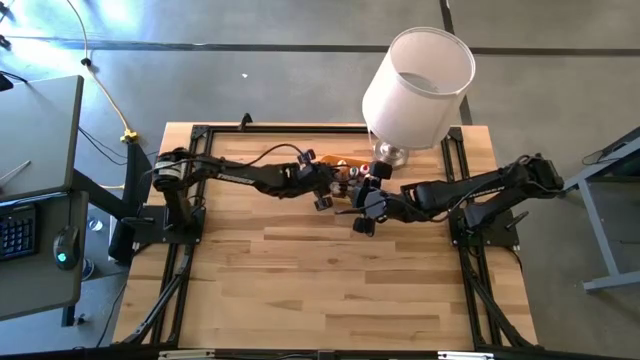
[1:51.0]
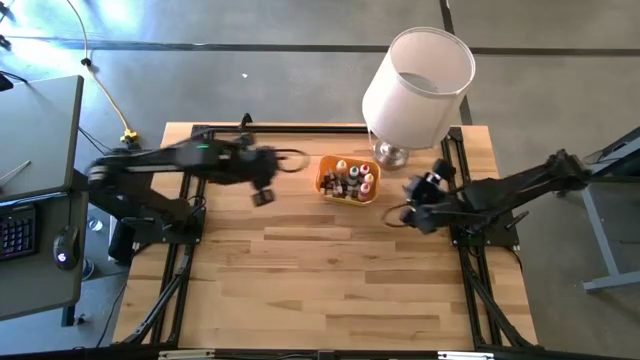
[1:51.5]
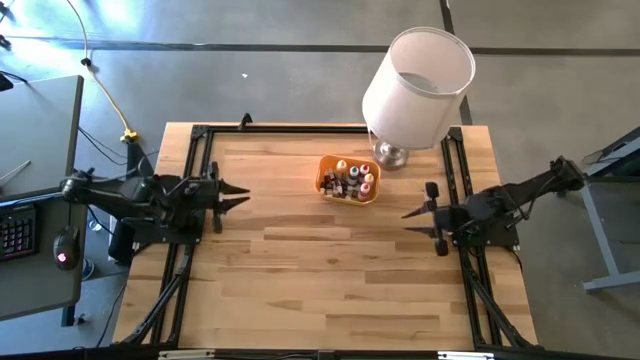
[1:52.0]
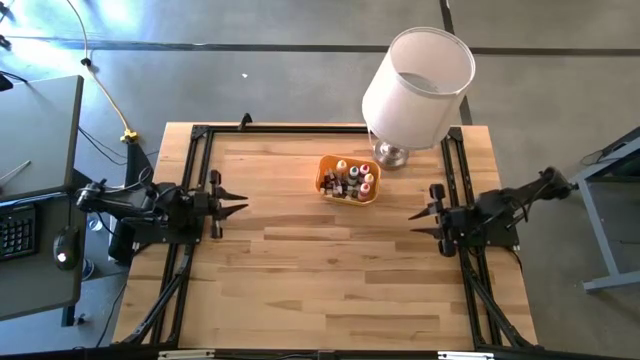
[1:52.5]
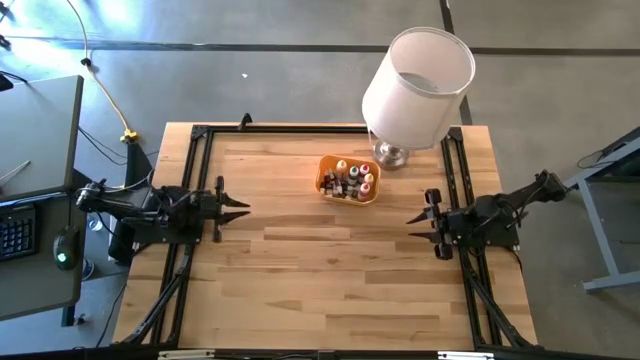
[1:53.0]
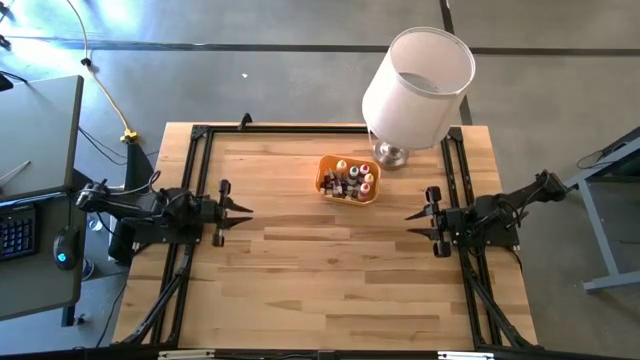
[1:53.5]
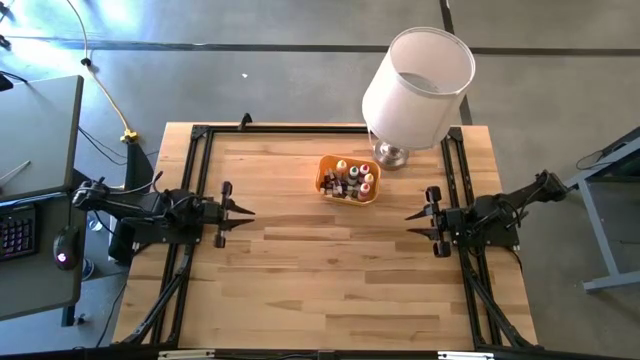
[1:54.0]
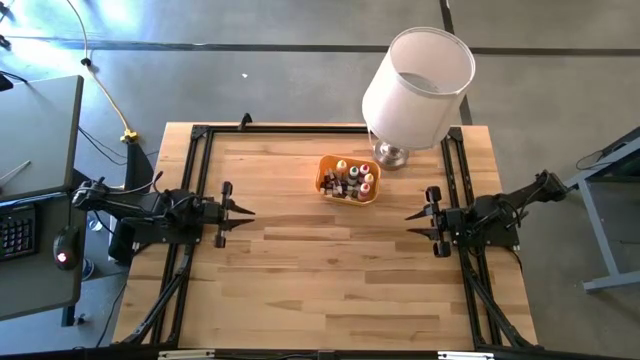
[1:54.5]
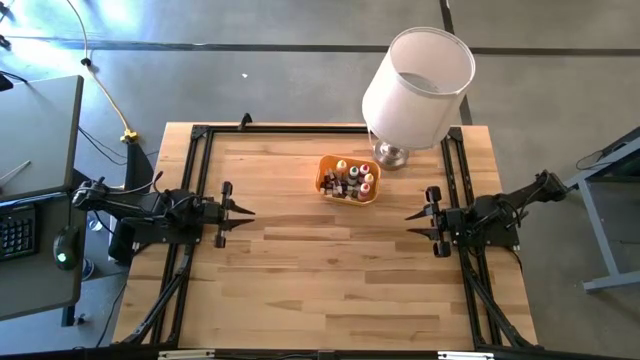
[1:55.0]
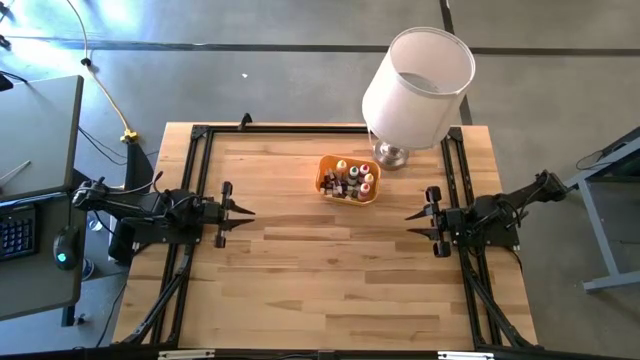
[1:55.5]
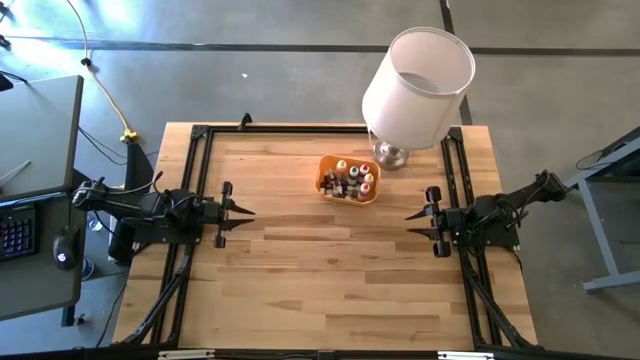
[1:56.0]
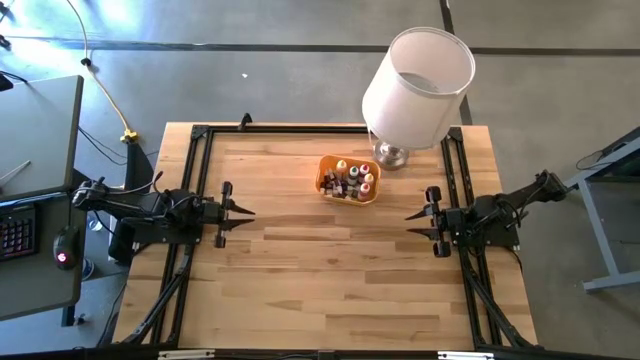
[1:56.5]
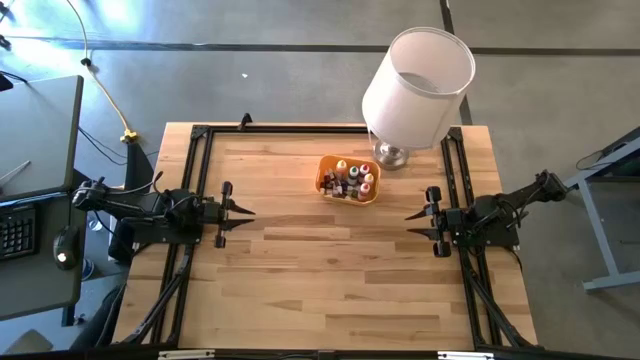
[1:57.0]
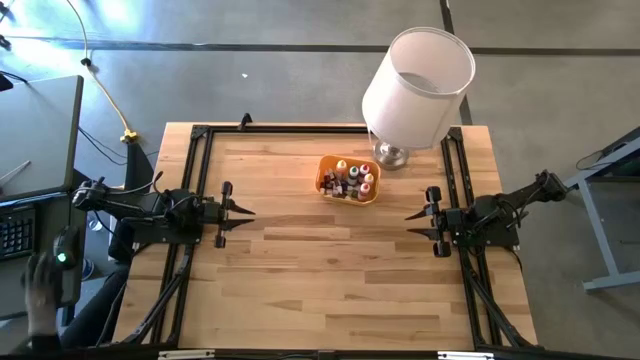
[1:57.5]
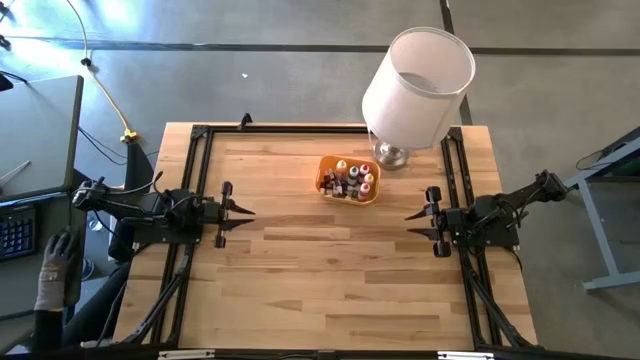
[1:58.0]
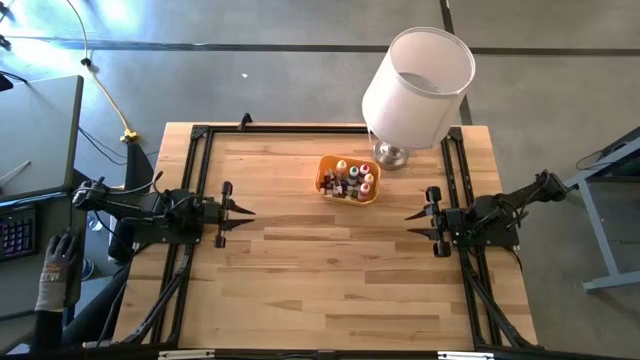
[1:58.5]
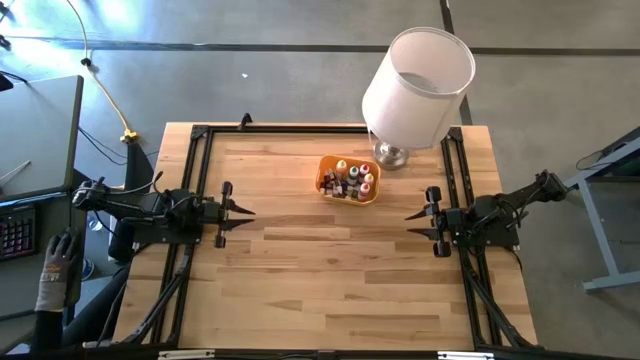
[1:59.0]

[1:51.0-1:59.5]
Task: Pick & Place food coloring
Return to Home Position

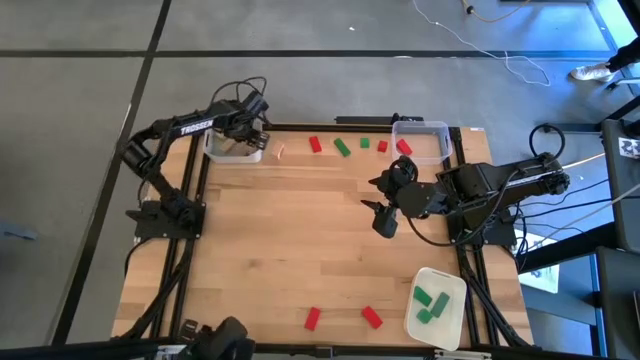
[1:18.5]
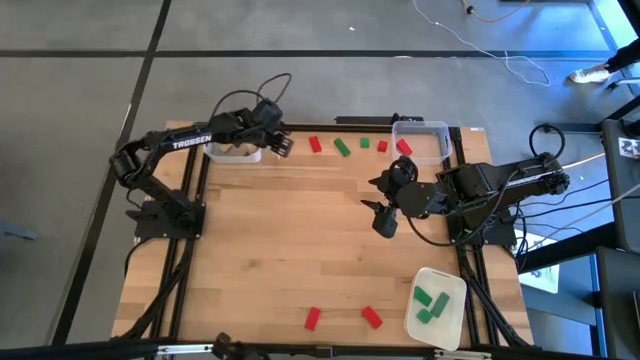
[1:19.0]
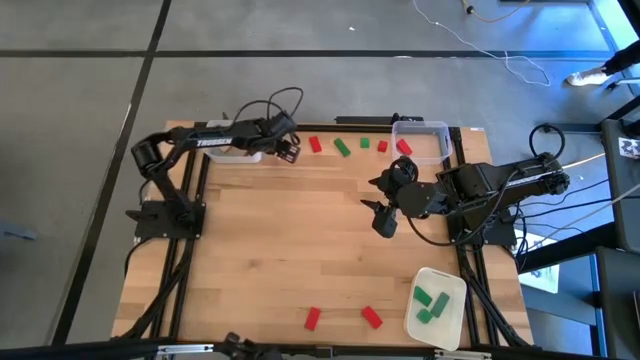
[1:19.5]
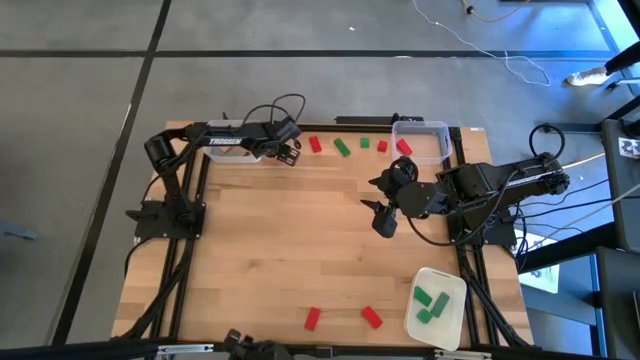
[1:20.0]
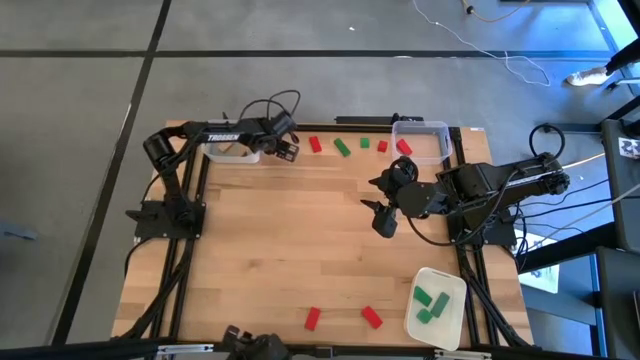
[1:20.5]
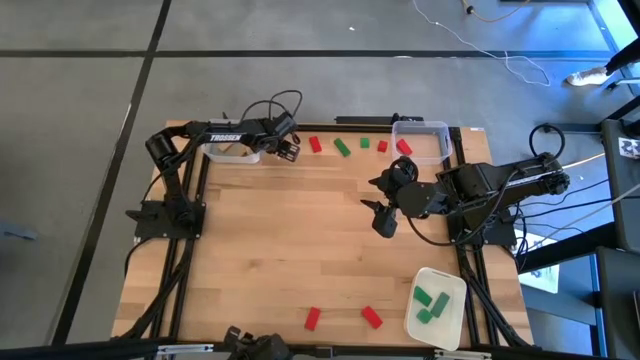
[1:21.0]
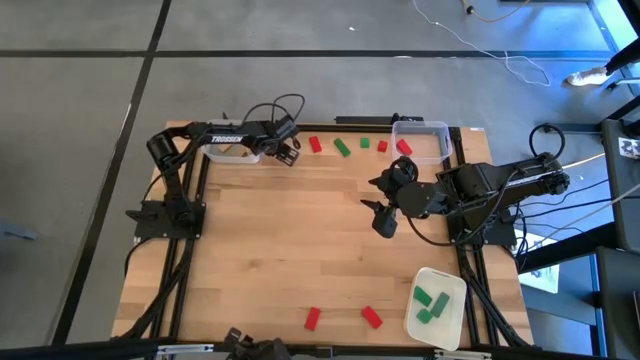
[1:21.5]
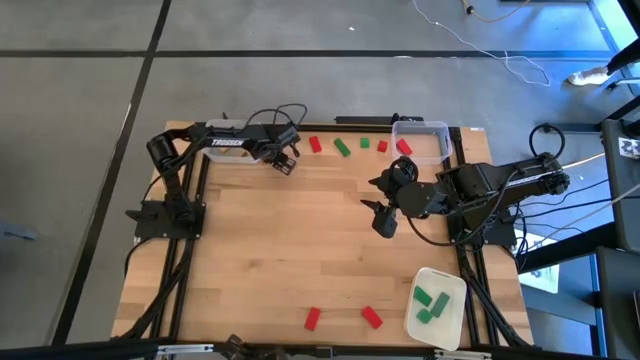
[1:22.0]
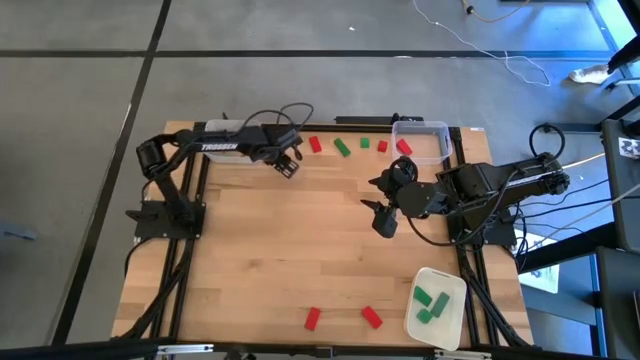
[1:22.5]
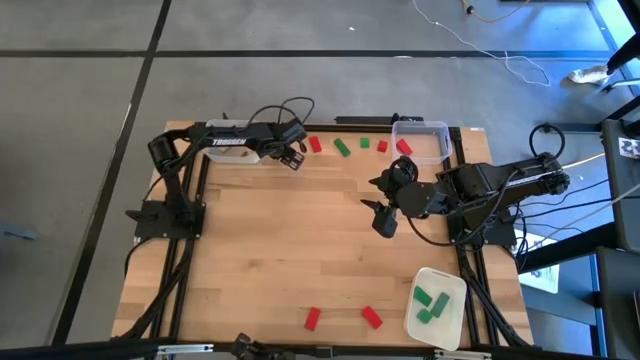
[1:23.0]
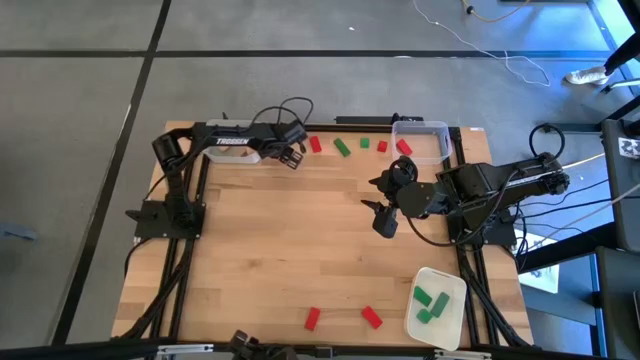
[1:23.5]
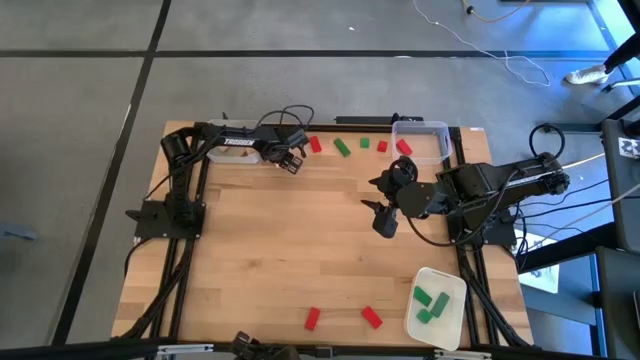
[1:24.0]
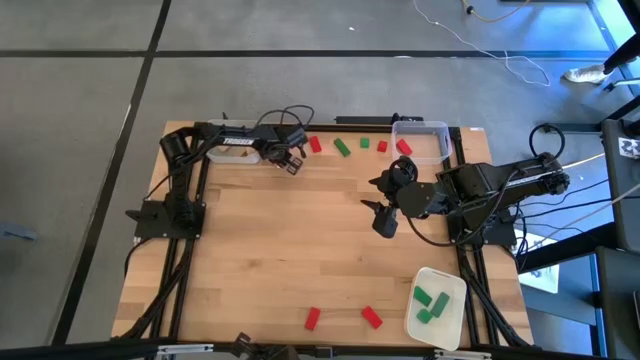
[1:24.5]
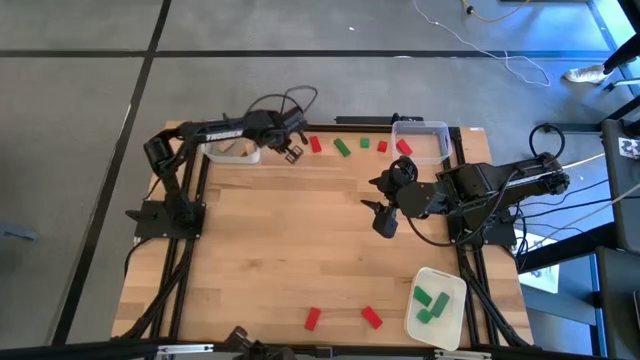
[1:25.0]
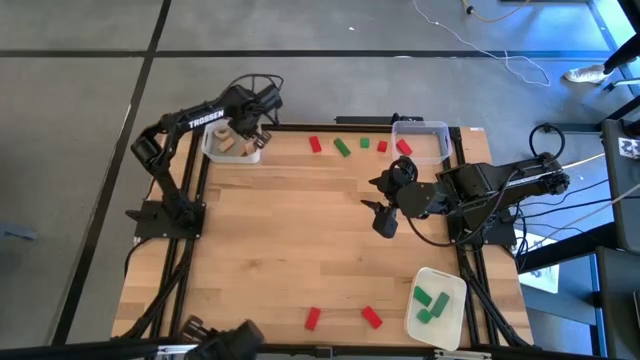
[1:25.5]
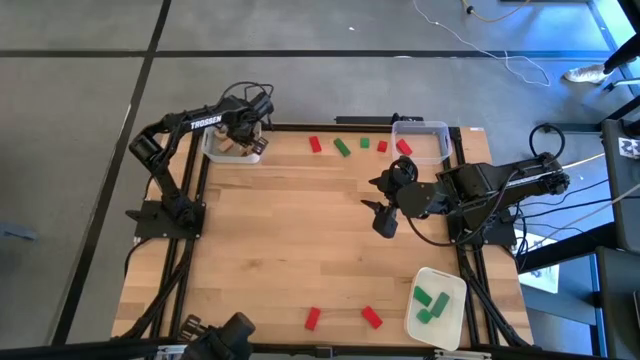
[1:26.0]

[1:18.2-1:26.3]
Task: Sort & place blocks by color
Put the light brown block into the gray bin

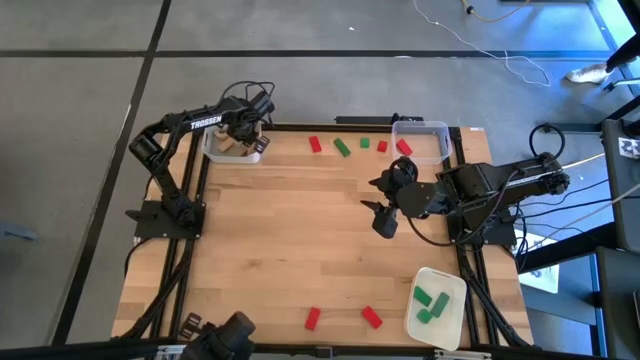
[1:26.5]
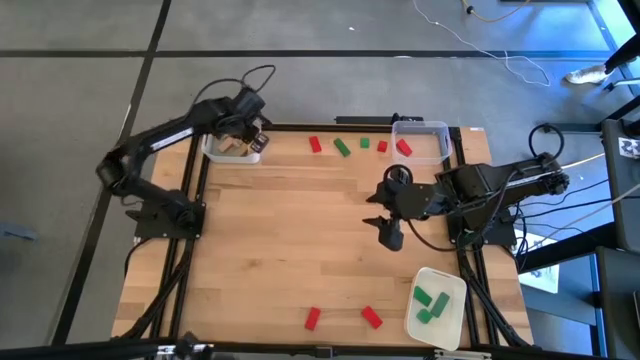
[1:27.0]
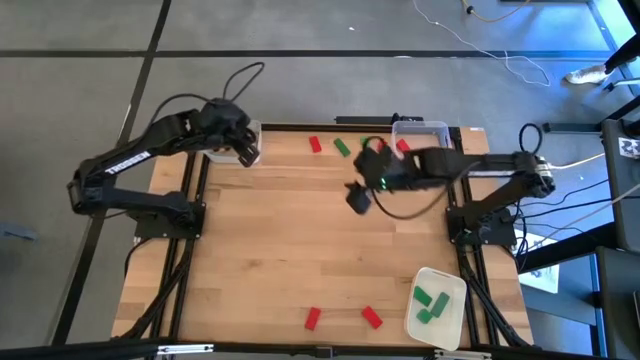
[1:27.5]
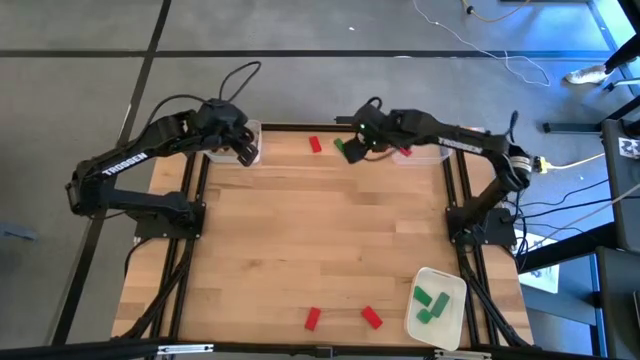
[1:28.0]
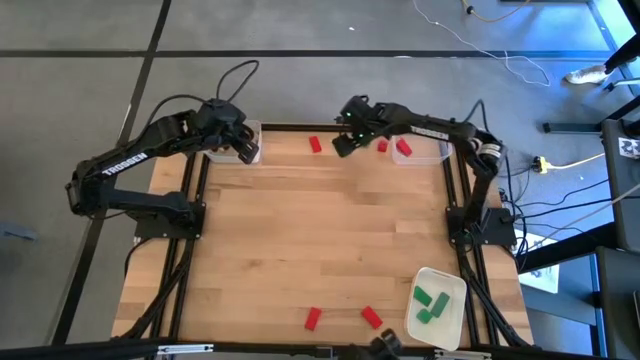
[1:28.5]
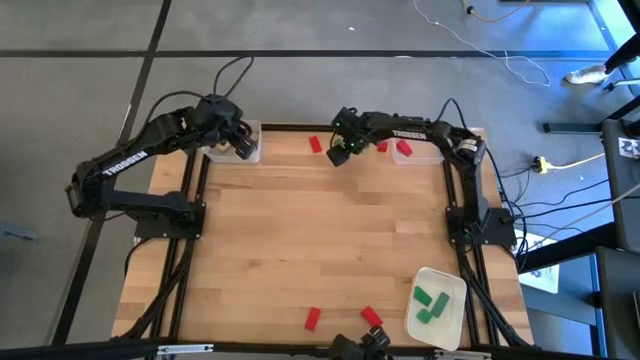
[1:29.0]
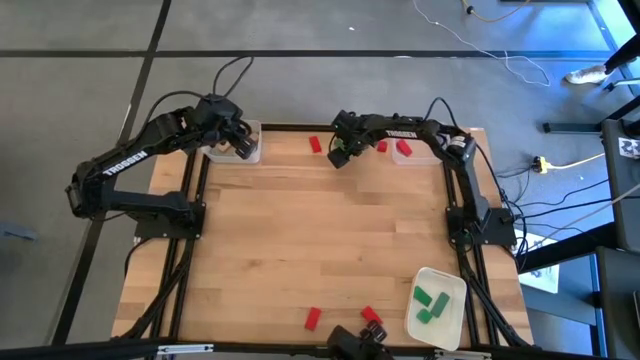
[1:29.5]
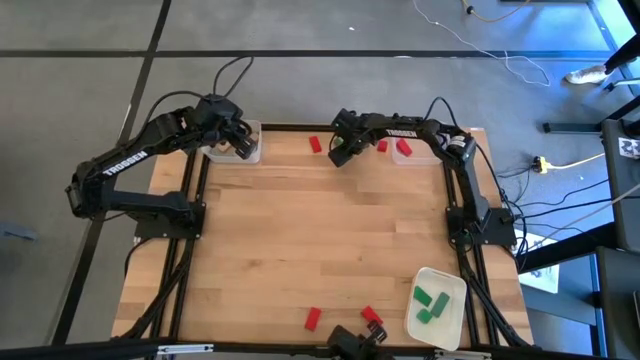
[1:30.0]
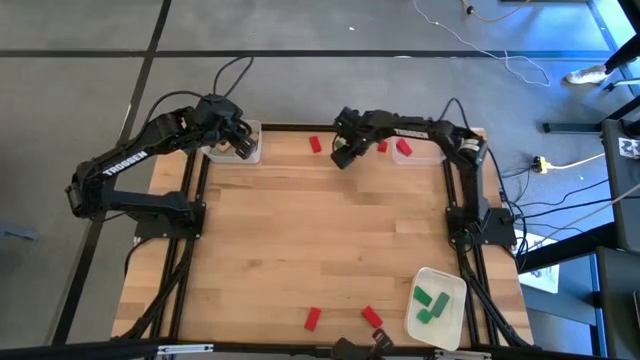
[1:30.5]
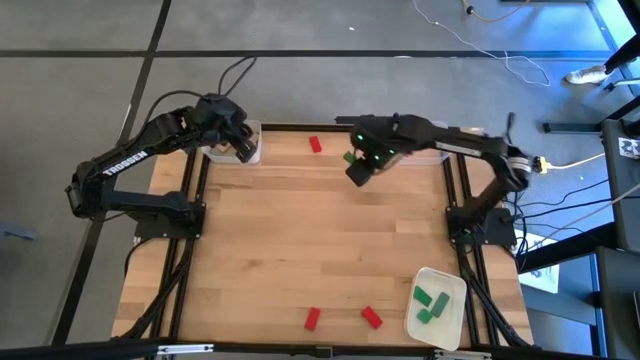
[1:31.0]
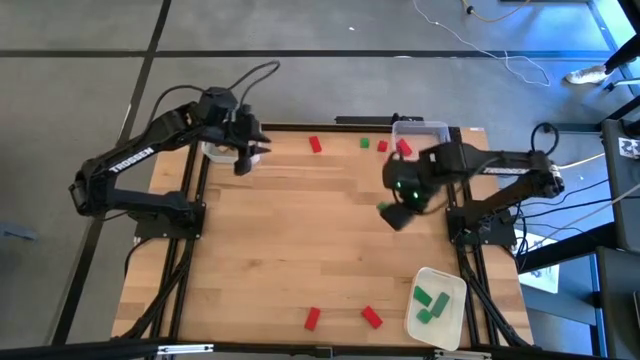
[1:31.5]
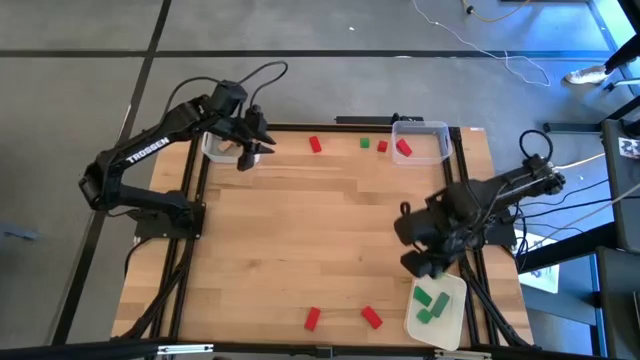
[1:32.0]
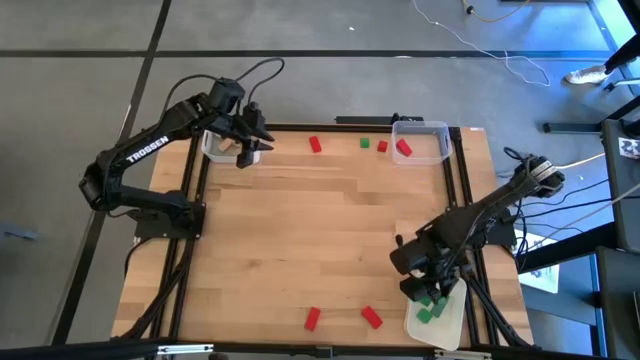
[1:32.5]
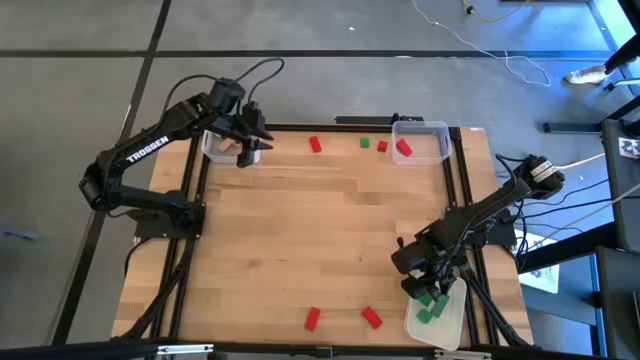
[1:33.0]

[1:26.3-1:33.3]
Put the green block into the white bin
